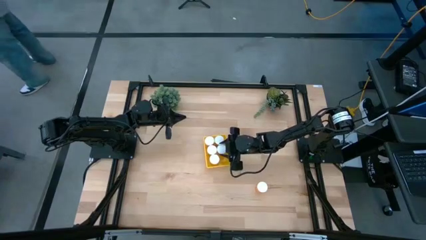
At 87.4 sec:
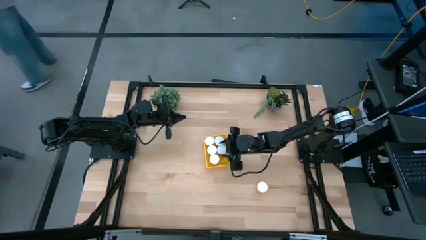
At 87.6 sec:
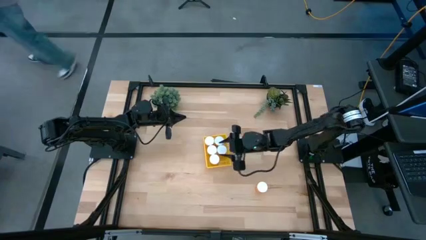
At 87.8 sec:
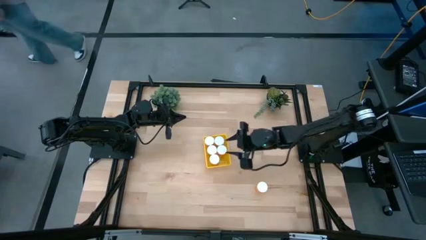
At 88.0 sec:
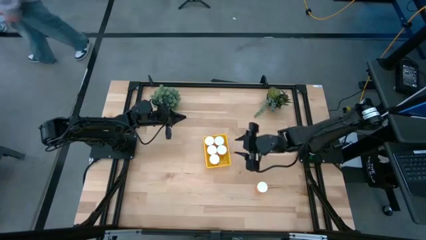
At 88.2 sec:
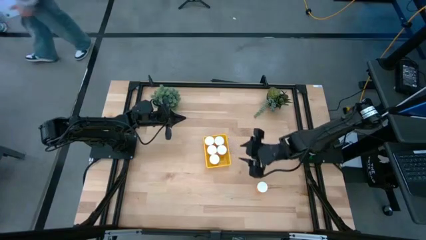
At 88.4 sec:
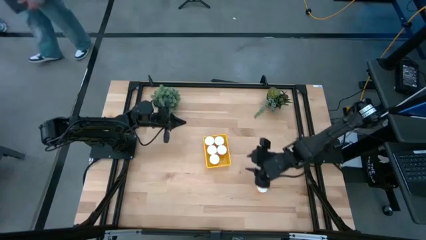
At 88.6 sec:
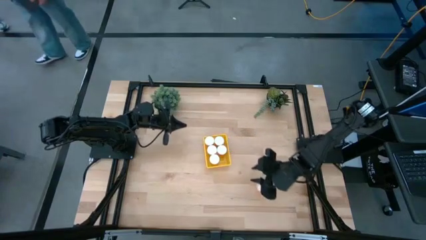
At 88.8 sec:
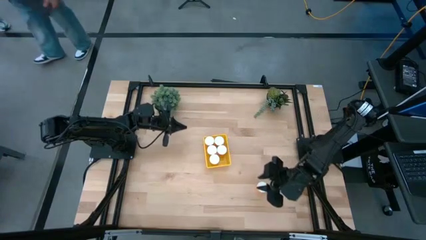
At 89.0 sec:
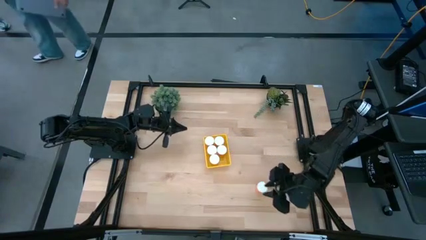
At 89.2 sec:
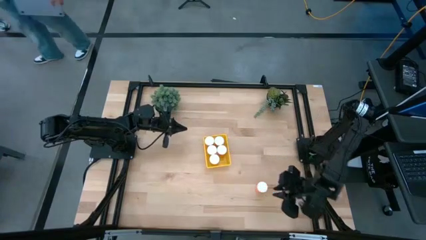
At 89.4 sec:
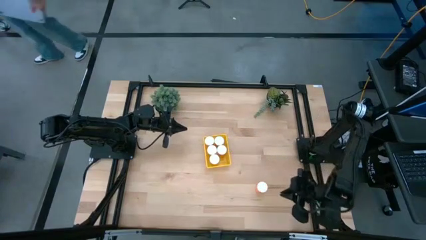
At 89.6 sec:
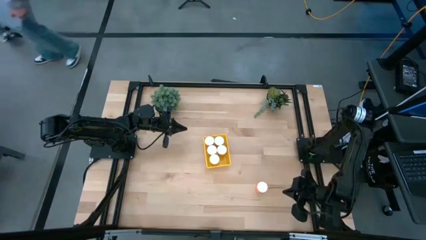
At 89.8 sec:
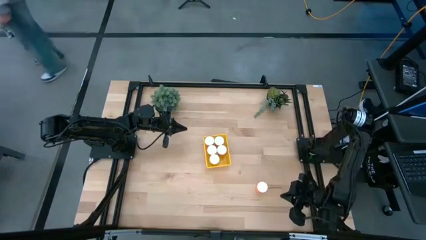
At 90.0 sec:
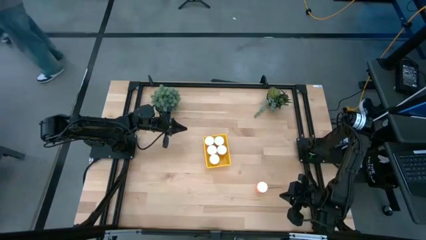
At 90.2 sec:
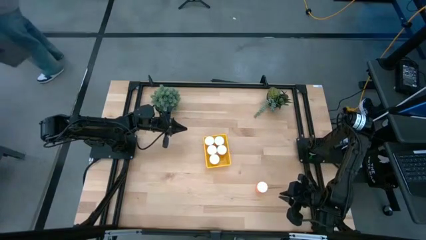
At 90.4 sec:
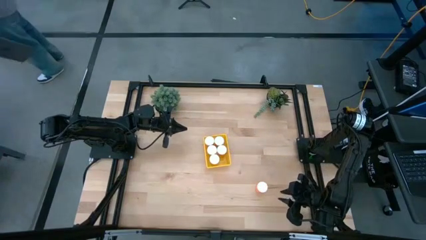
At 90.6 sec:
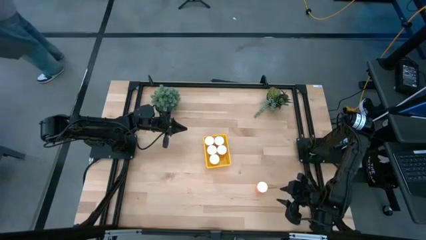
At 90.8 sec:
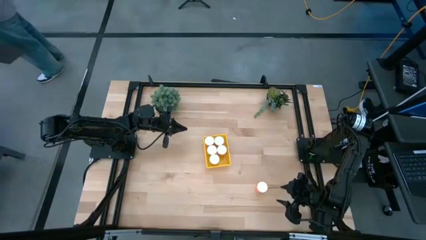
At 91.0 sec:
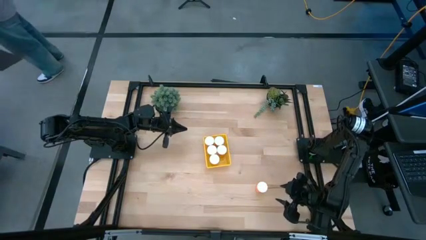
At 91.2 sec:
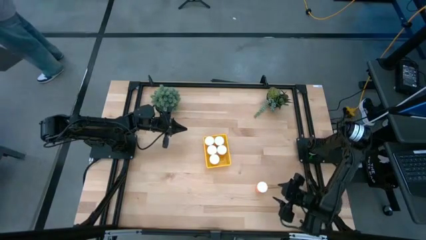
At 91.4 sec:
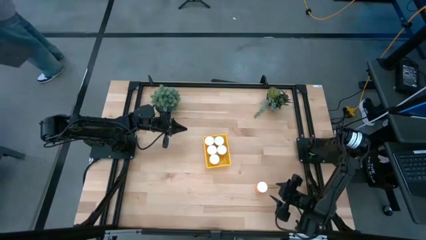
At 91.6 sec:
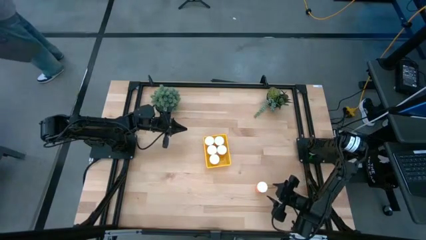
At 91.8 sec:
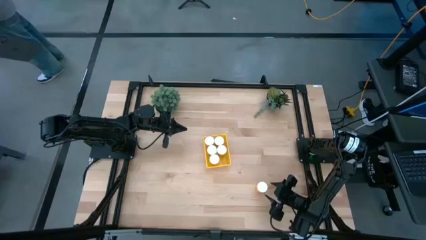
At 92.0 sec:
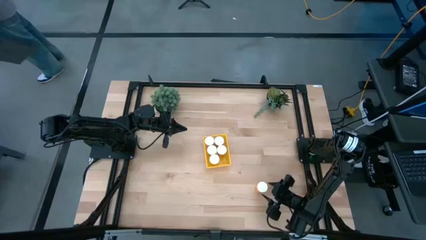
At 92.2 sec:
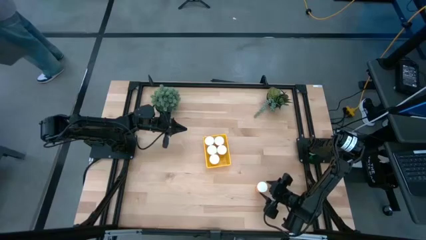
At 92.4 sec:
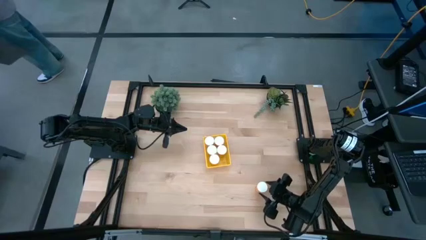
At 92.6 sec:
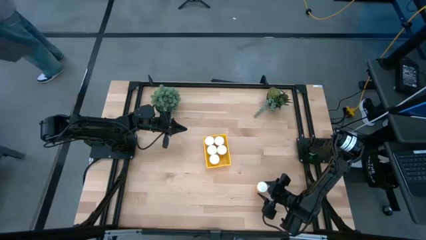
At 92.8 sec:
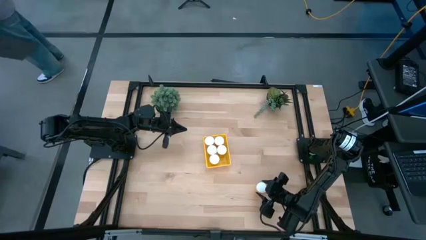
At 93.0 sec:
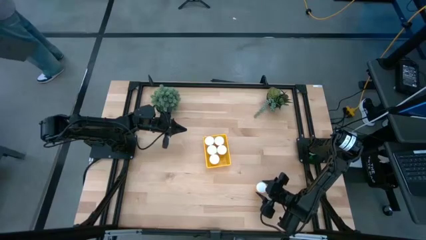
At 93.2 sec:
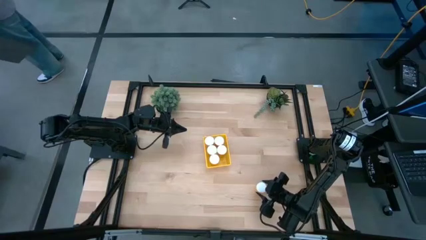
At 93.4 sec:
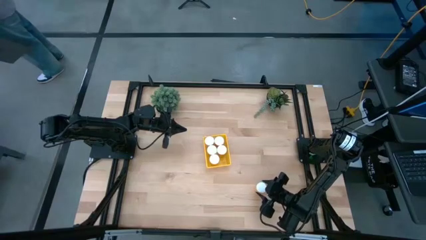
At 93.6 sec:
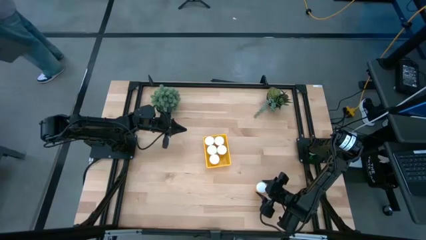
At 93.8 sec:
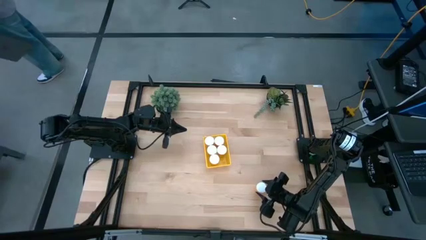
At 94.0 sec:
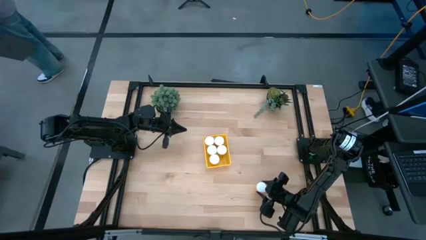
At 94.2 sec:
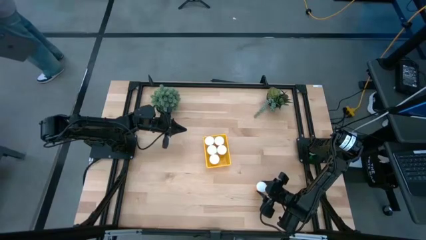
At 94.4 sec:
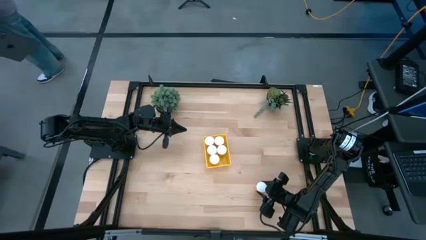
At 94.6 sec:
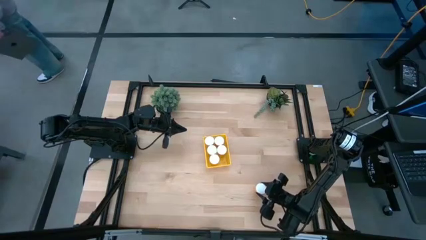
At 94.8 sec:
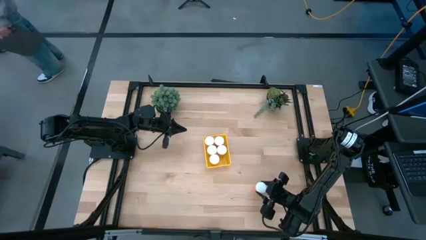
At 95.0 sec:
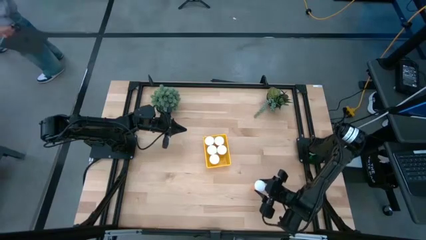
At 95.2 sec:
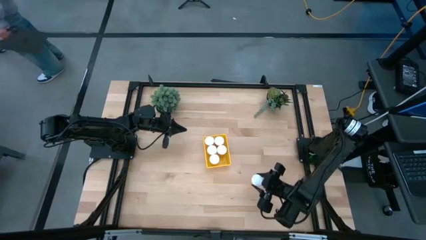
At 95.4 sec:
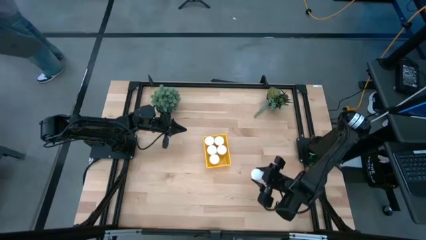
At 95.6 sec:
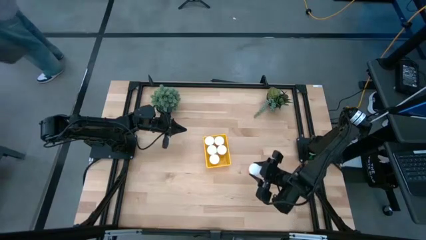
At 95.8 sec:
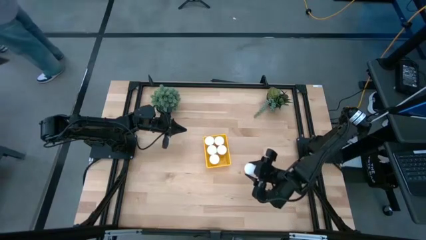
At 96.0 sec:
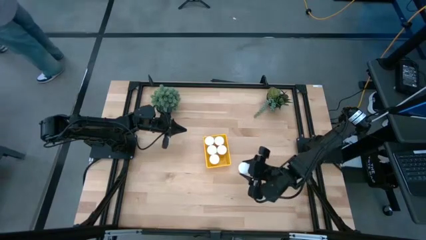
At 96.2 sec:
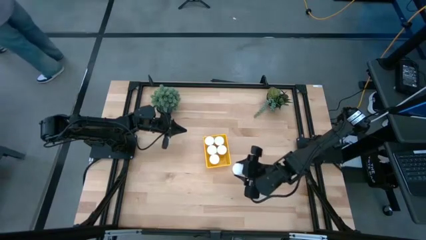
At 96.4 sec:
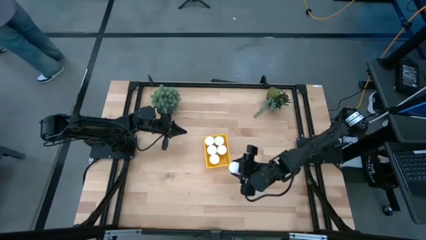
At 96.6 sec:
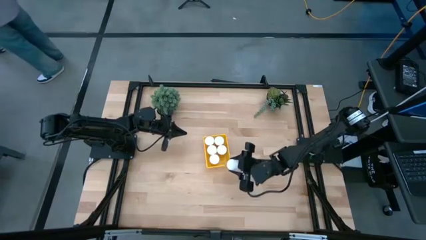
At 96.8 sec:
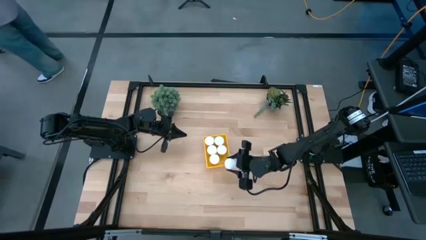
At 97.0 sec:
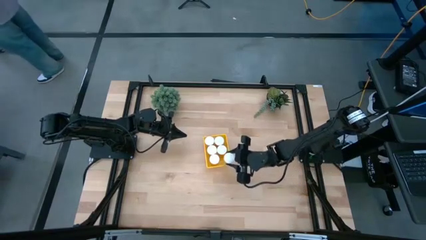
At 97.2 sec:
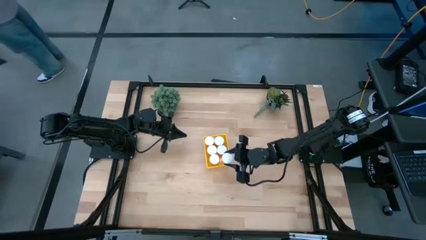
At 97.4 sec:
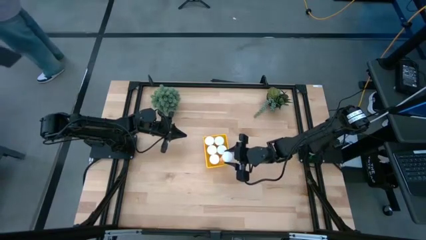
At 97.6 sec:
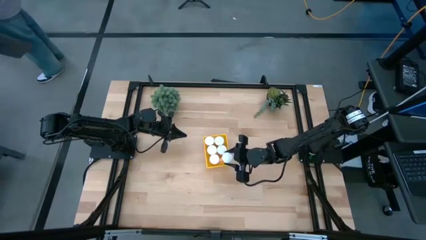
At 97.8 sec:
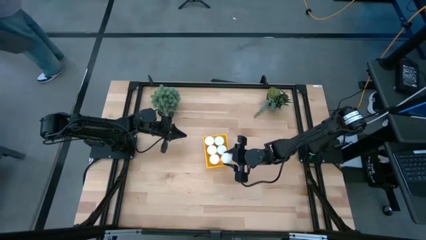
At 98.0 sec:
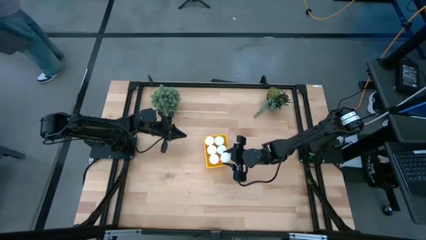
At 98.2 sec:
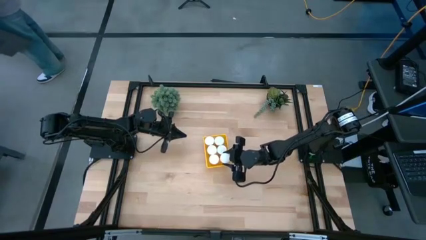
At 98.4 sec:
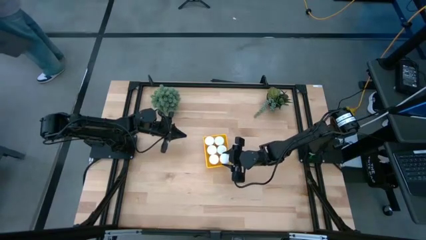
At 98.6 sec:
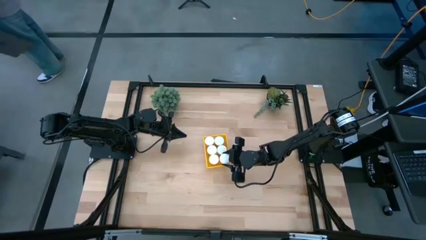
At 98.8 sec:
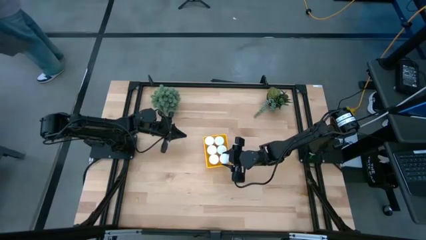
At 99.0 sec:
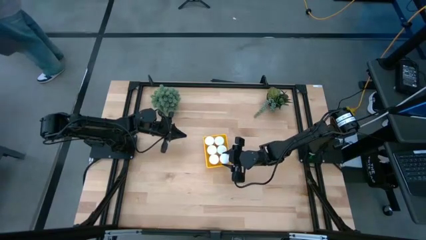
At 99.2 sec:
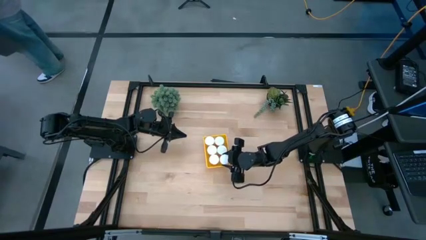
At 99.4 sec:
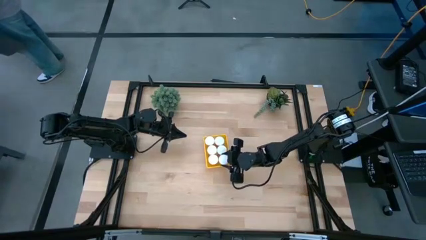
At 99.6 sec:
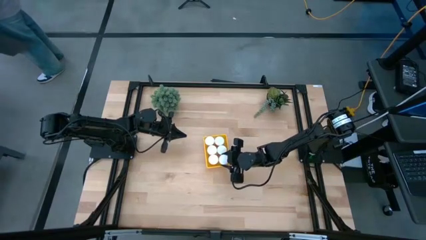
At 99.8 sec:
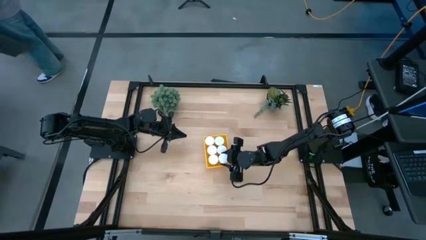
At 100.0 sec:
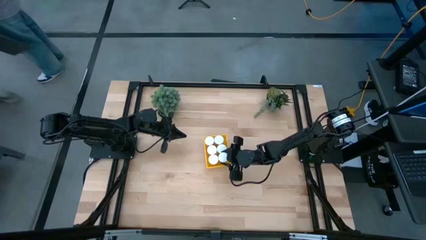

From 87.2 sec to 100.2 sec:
Task: Pick and place pill bottles into a basket
Put the orange pill bottle into the yellow bin
